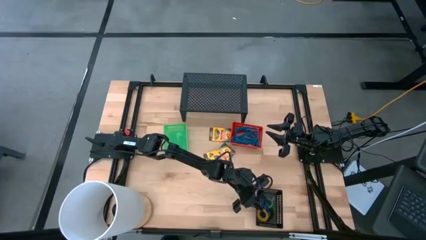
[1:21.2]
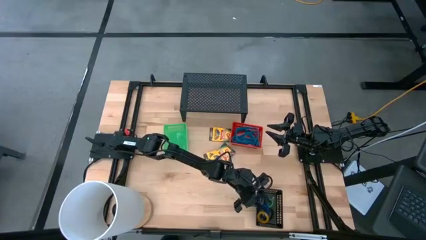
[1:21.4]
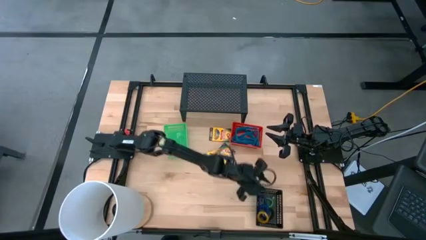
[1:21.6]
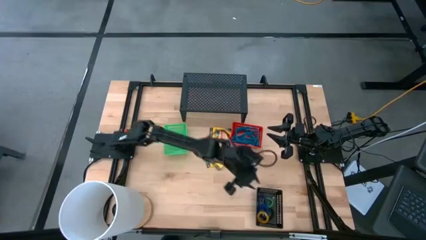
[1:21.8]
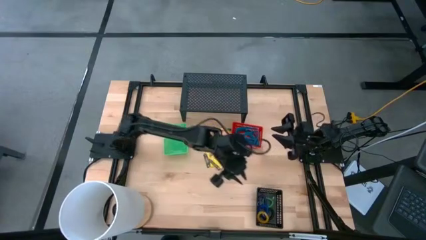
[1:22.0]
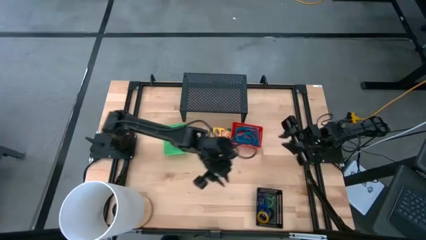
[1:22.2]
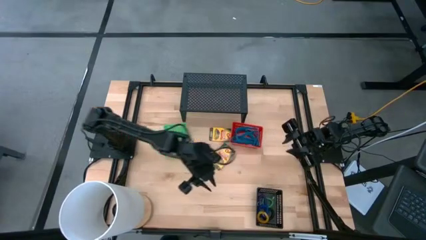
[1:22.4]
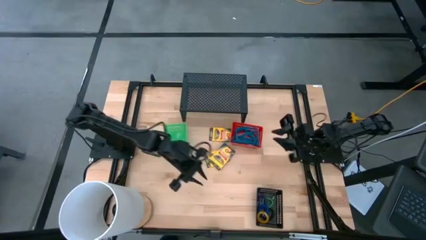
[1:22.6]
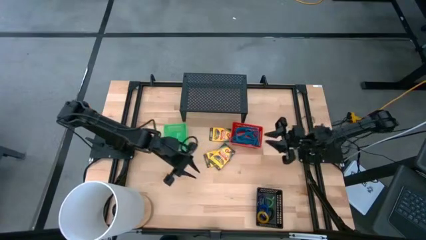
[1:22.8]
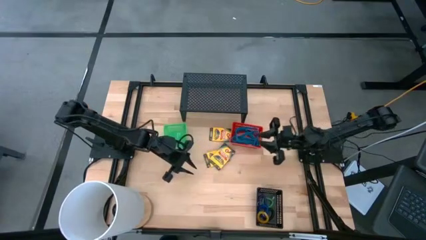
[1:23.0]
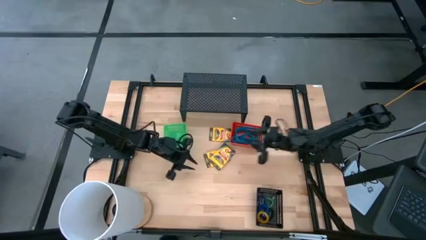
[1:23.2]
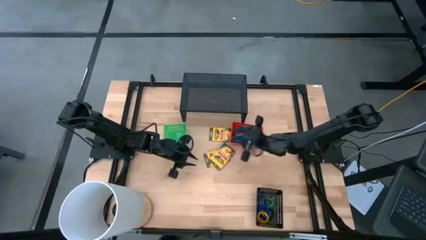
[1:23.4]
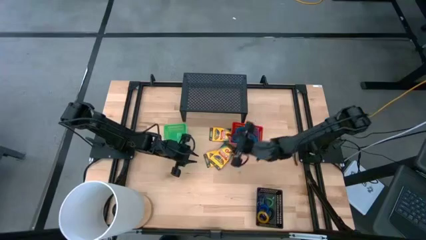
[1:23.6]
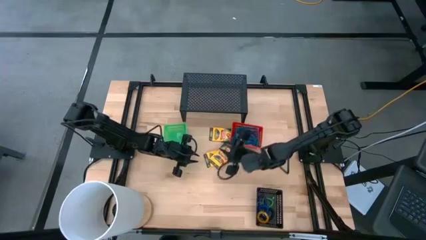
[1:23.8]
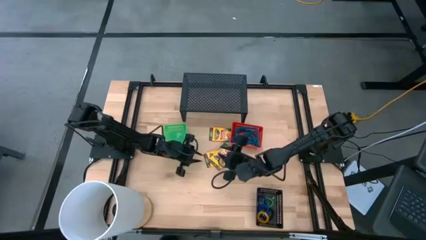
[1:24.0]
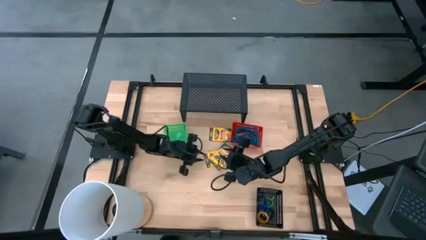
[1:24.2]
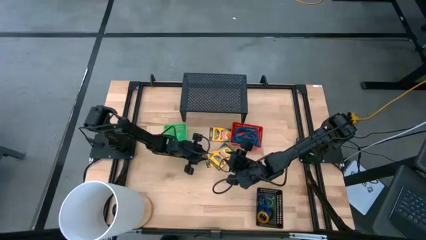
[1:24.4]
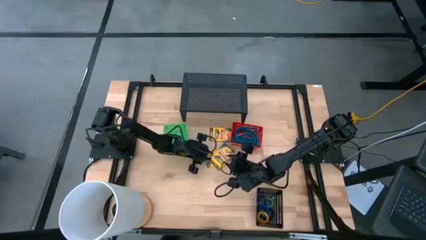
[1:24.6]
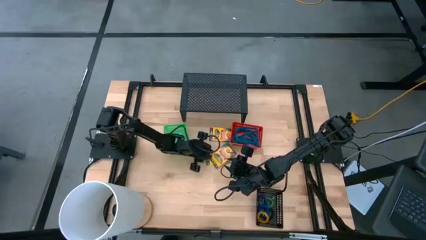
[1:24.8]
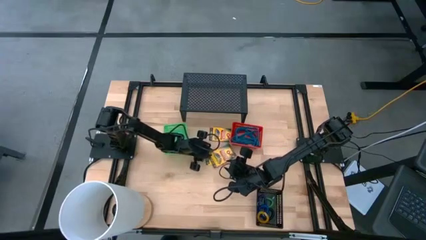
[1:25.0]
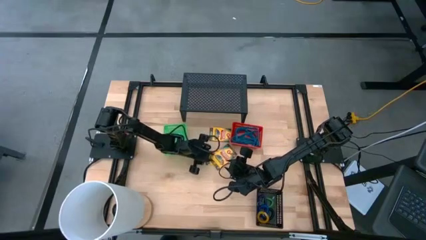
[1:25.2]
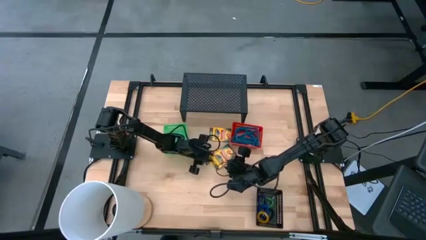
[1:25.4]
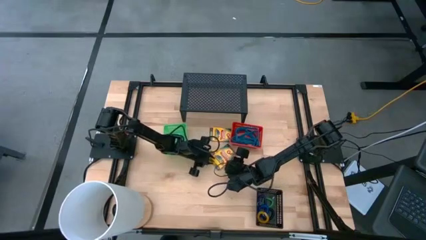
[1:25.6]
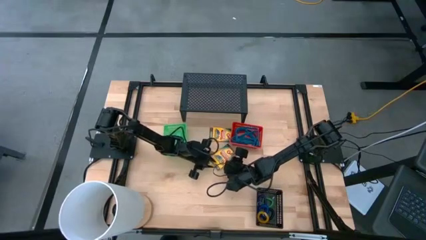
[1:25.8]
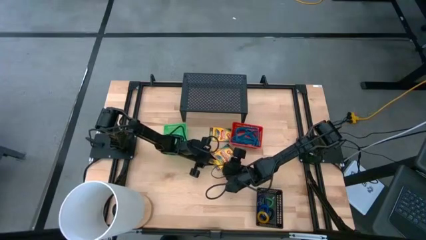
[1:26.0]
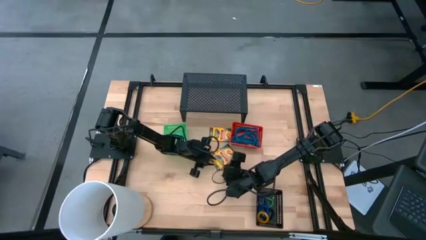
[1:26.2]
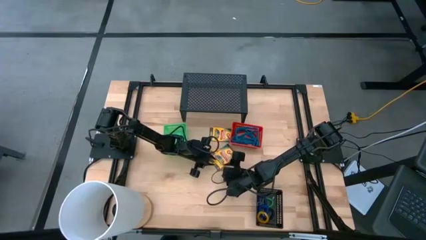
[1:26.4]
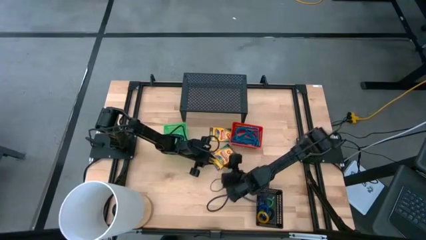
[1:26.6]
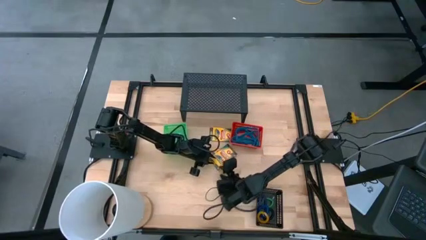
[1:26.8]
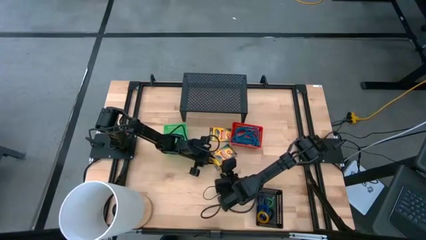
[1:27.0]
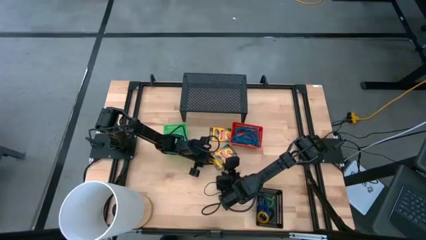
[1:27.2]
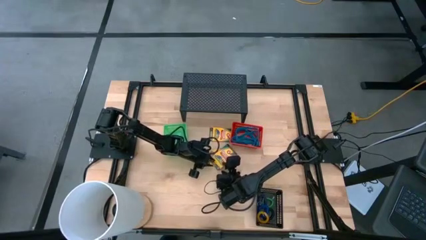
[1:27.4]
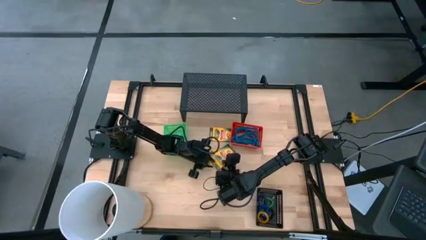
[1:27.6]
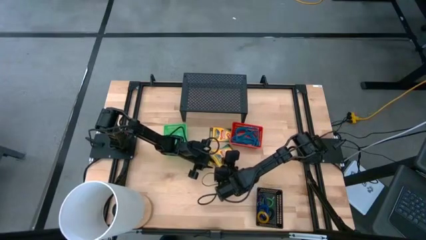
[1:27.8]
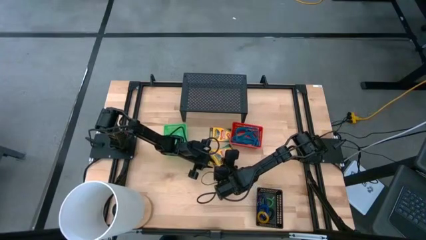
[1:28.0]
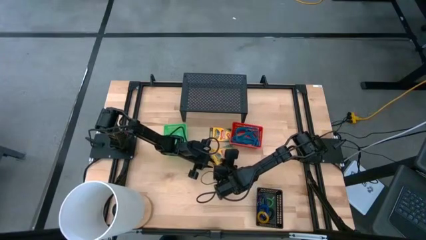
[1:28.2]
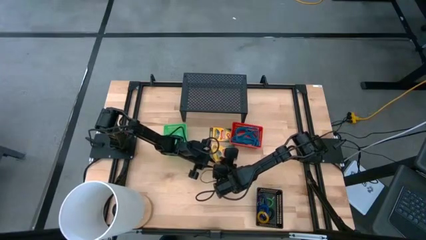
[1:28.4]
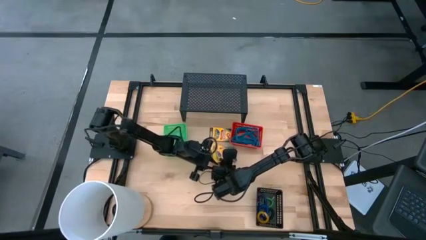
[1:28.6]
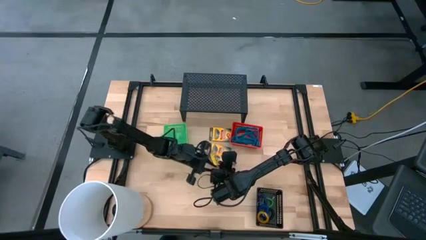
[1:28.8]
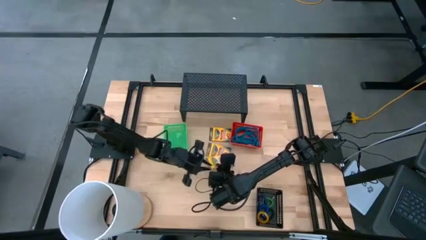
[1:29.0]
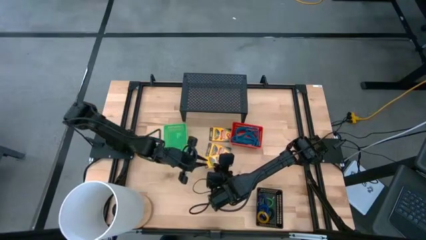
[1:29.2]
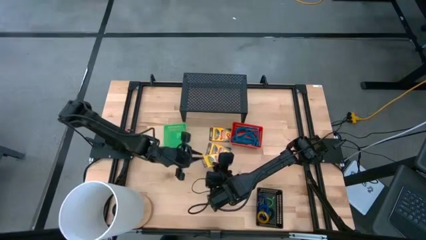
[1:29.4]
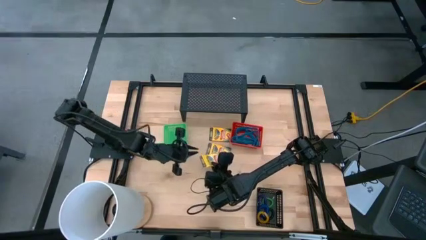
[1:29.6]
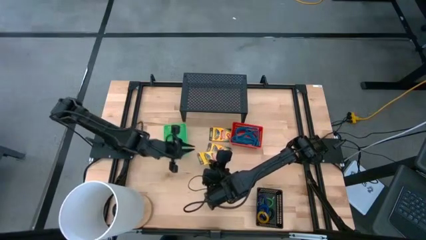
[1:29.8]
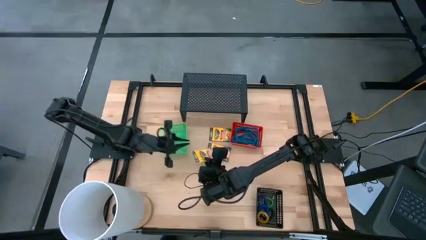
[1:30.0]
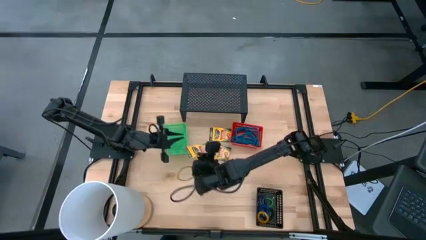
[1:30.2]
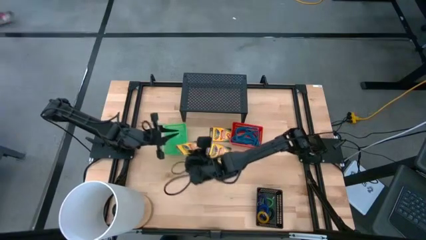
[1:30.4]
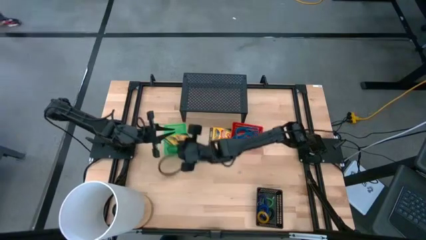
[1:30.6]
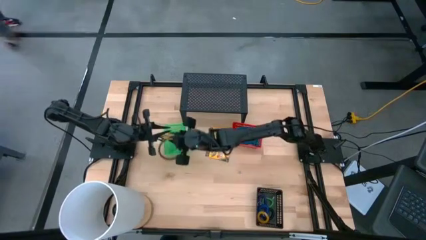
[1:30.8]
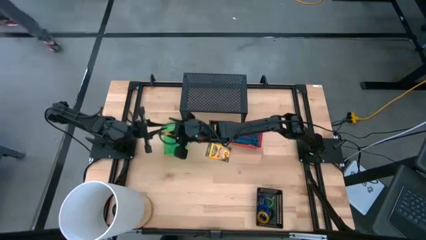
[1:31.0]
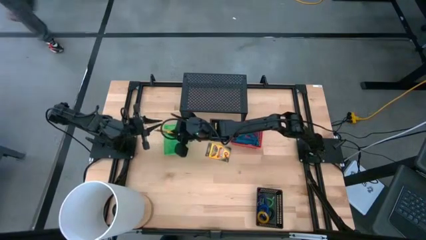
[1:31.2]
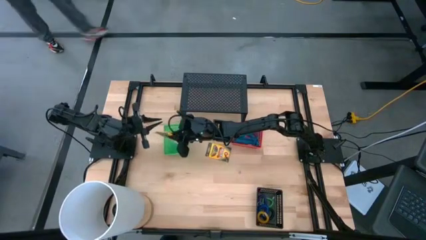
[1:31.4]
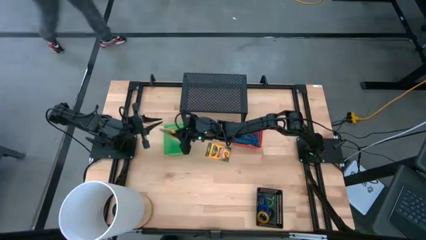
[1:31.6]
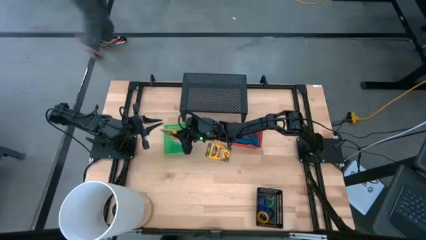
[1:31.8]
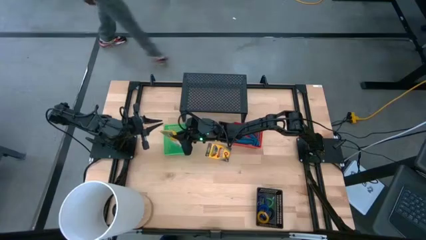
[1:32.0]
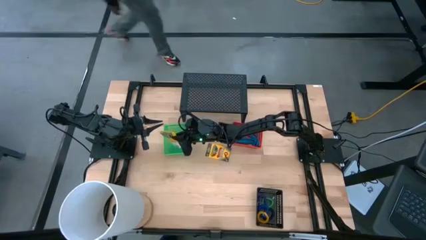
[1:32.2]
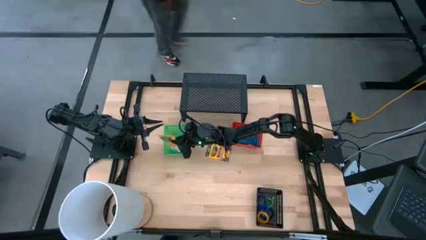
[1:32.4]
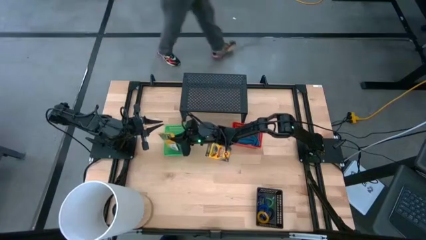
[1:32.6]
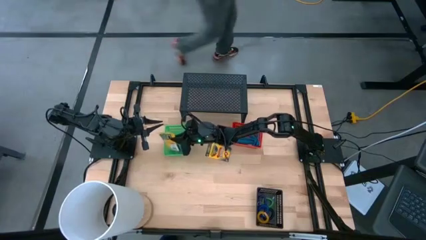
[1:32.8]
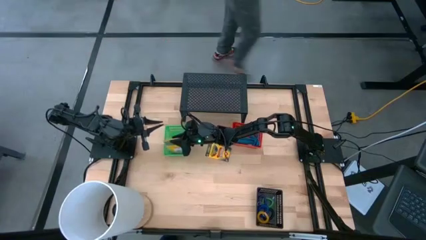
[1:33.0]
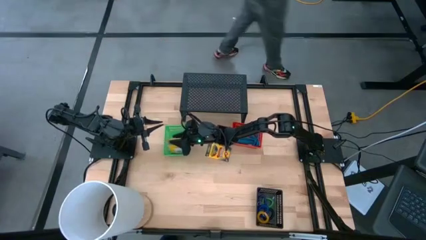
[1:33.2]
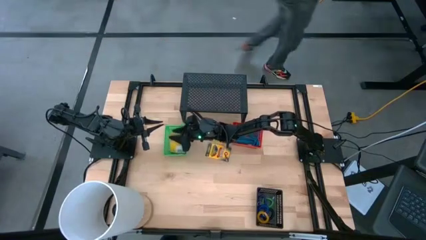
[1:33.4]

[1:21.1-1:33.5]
Task: Pick & Place Office Desk Supplies
Put the box of crayon into the black bin
